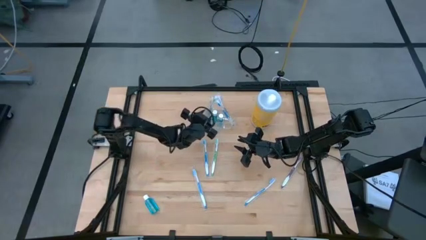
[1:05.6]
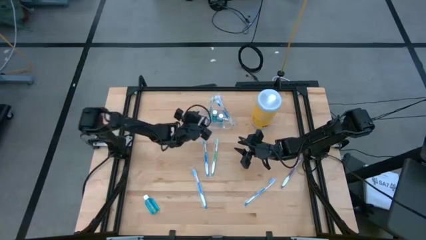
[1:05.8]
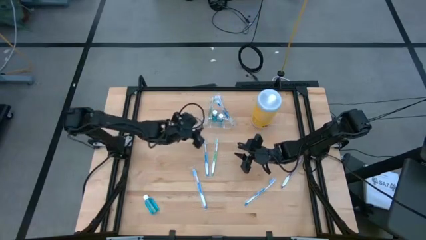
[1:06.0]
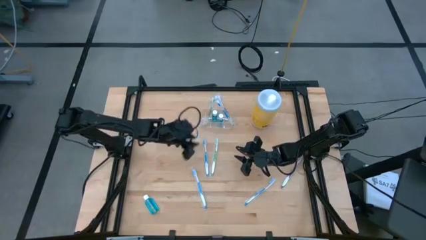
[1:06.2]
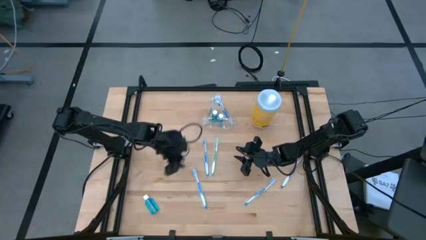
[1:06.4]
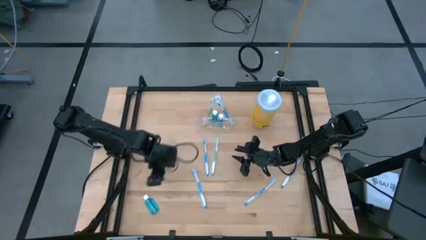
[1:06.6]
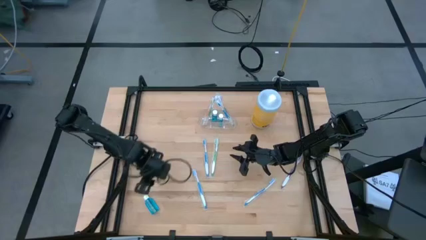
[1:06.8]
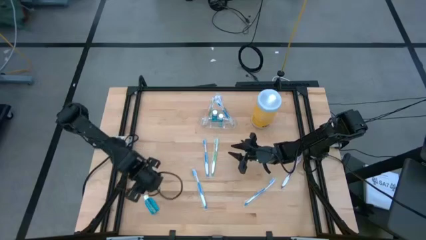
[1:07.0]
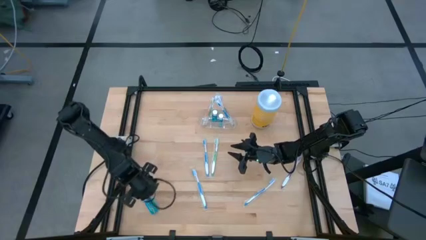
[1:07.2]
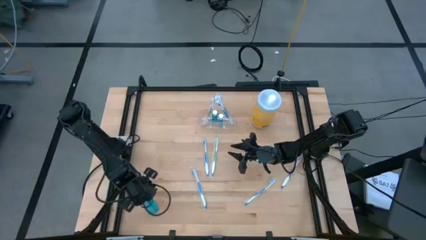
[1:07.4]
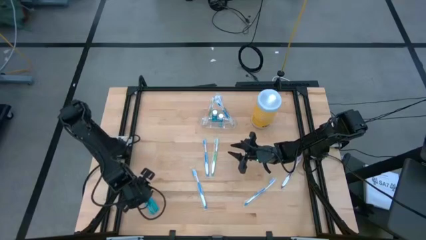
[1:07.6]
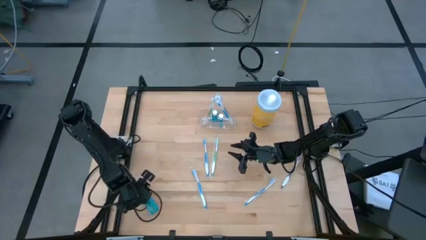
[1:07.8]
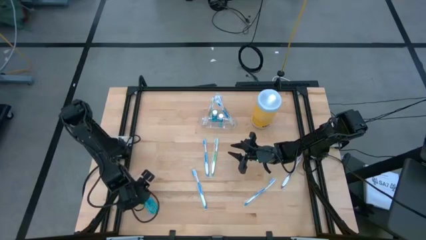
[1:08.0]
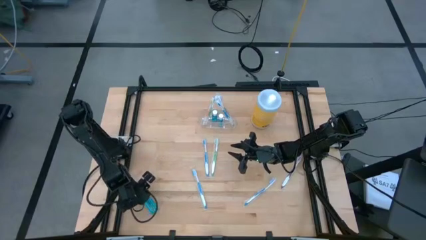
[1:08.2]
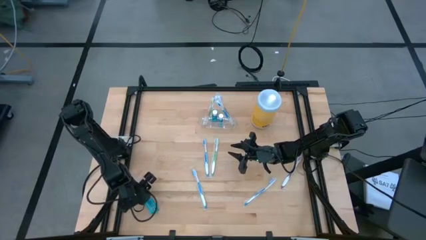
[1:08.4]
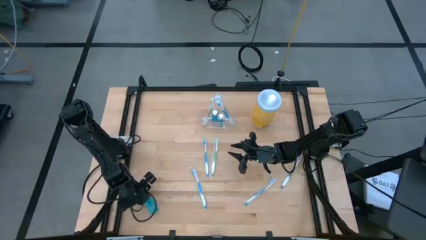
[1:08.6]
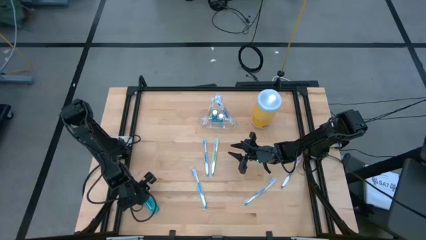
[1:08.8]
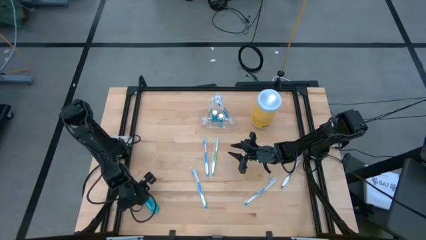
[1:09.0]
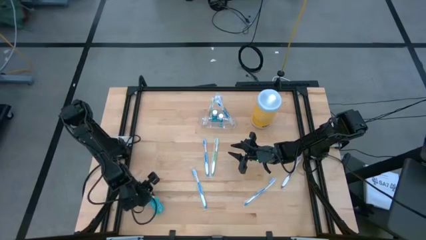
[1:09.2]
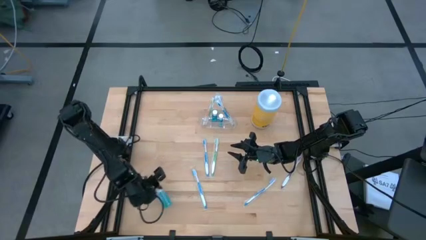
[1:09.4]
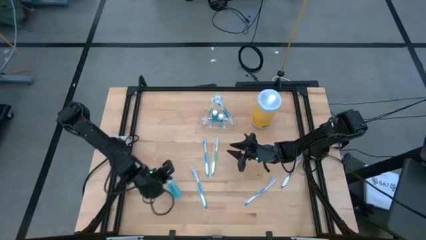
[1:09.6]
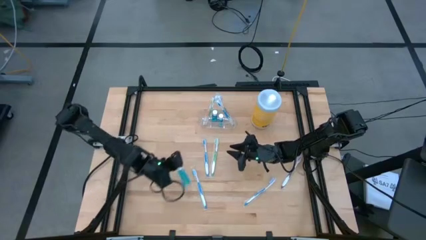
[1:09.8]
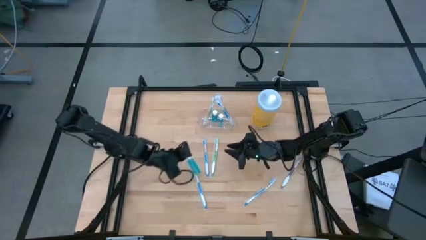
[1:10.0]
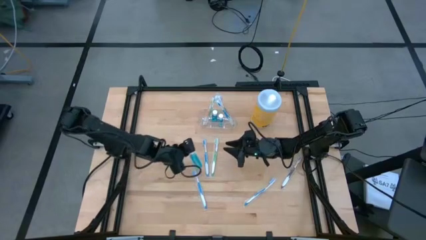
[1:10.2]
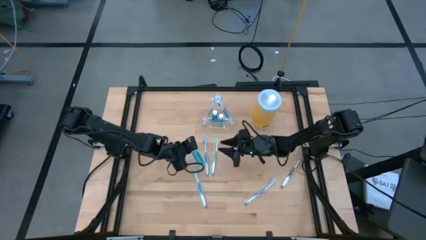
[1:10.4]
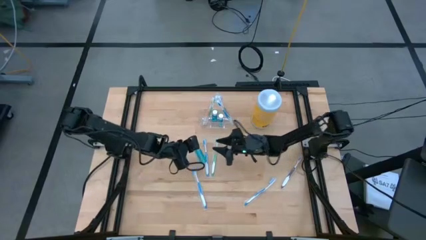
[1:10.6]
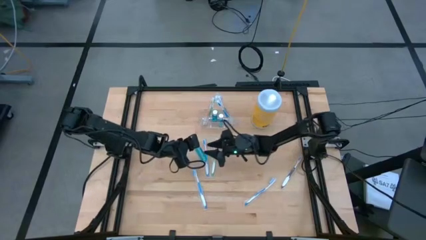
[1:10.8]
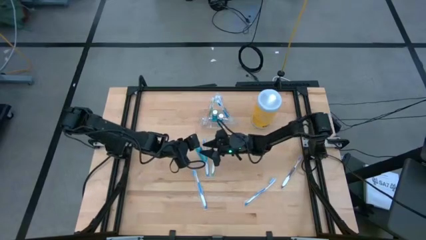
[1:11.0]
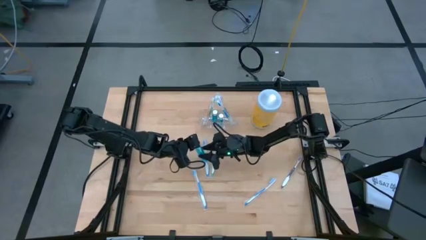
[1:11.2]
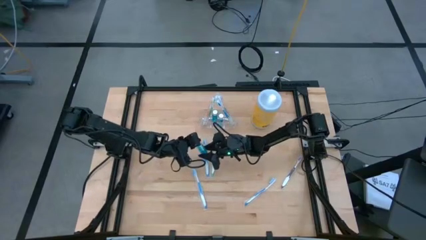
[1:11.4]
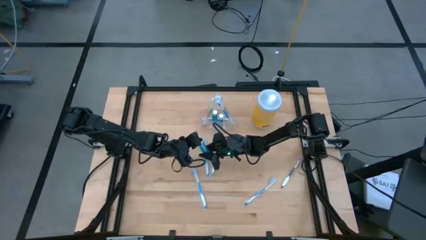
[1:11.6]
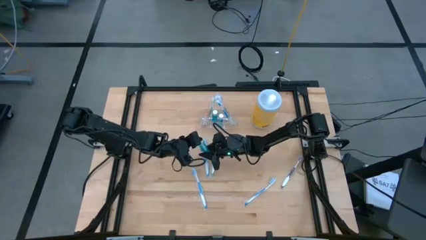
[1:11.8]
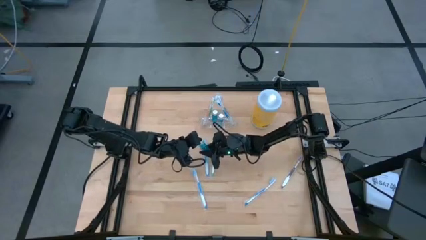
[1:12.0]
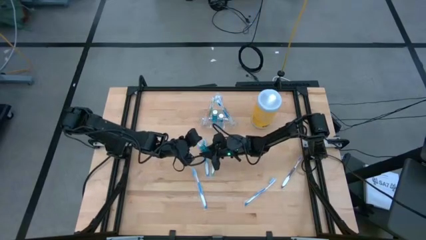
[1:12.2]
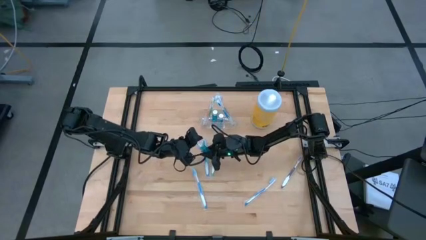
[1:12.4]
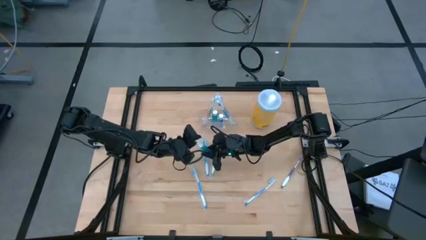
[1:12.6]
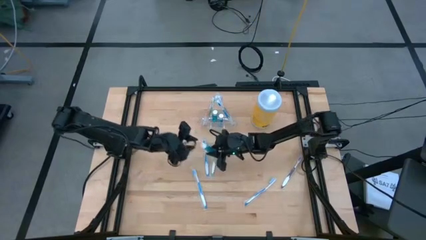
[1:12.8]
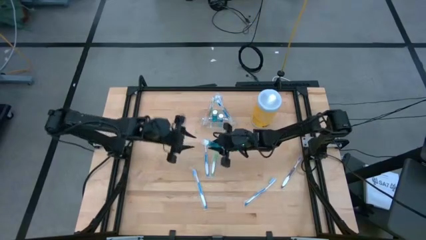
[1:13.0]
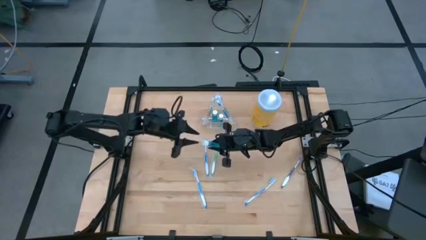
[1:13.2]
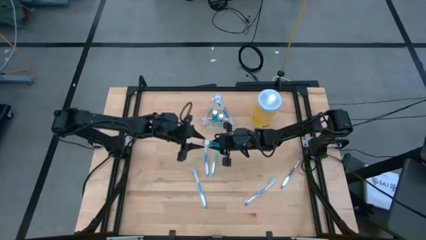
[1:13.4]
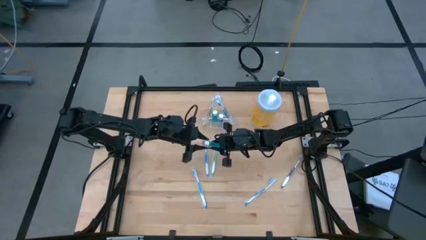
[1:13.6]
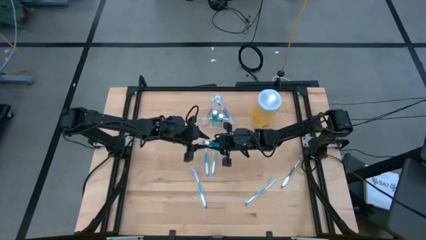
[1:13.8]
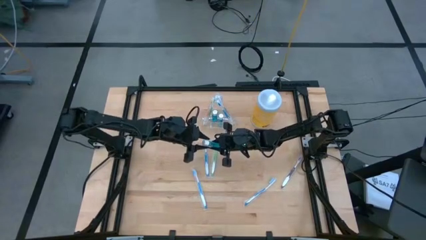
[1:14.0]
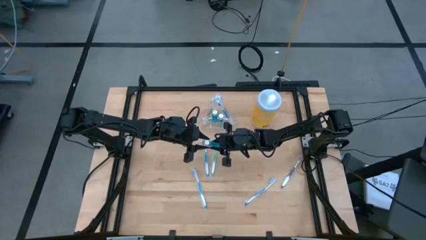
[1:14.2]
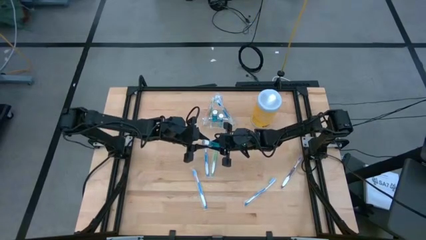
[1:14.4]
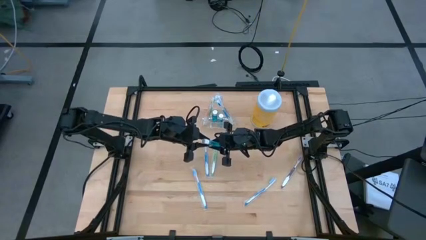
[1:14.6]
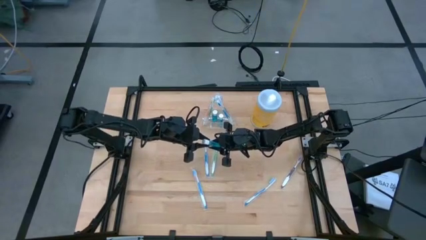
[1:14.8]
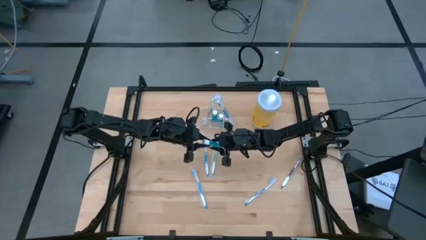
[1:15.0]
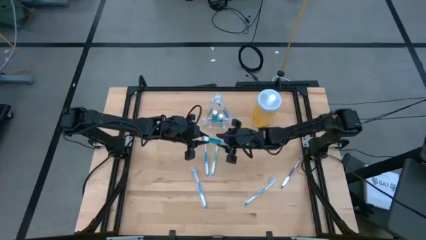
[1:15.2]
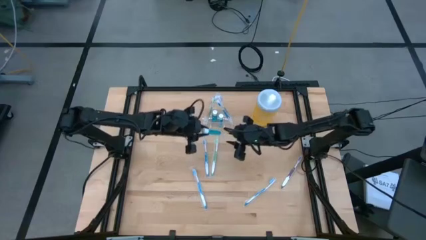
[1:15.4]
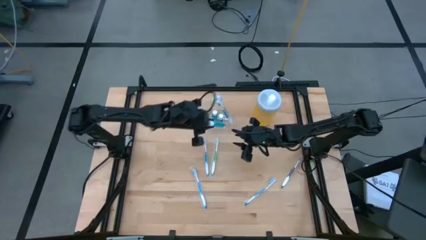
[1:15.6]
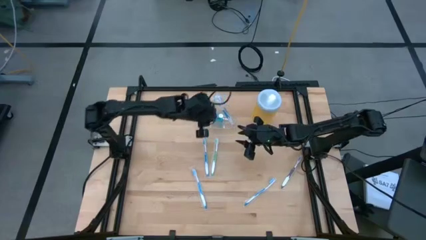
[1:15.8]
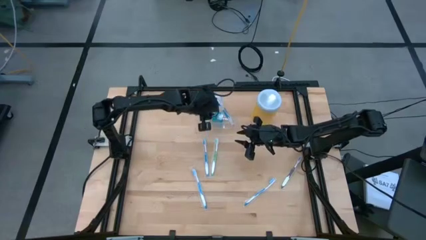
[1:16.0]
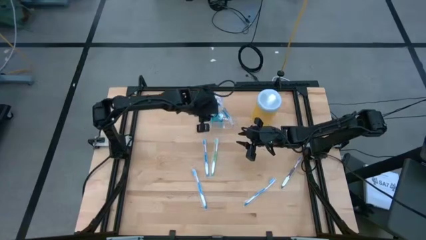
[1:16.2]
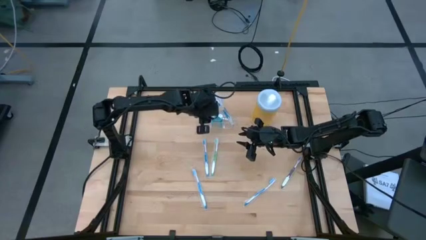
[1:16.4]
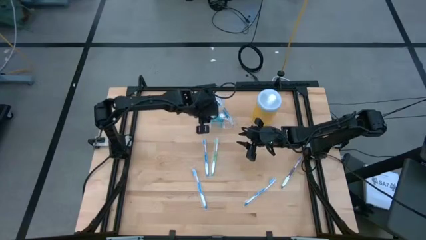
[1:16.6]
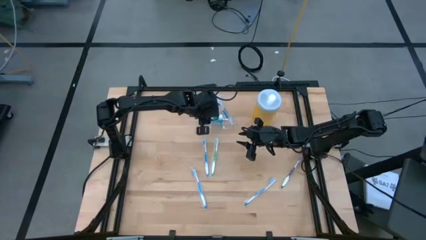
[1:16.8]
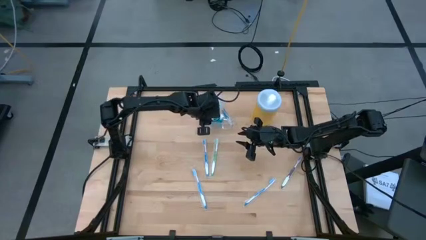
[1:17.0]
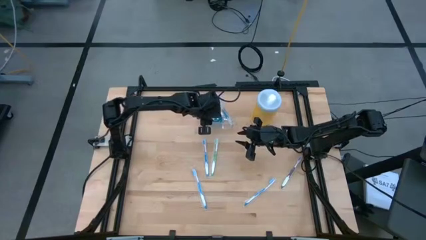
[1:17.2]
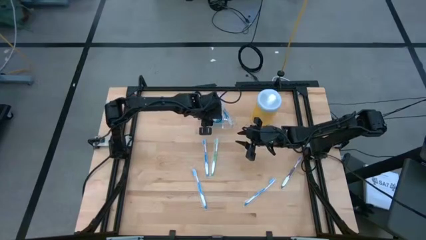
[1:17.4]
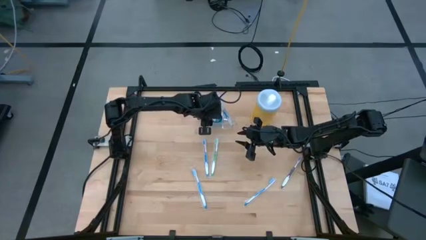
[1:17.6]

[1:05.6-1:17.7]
Task: Pick & Place toothbrushing station
Put the blue mouthwash into the middle compartment of the transparent organizer

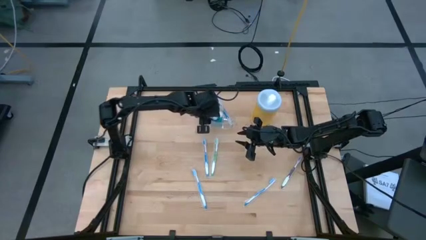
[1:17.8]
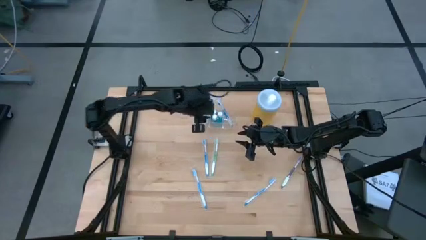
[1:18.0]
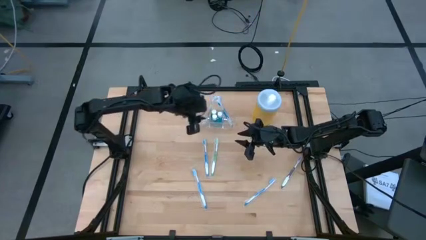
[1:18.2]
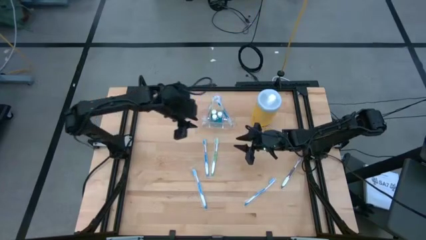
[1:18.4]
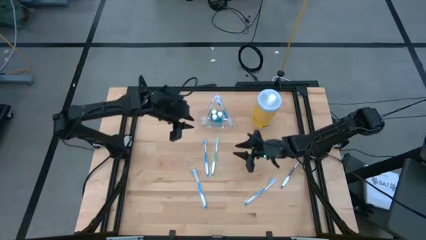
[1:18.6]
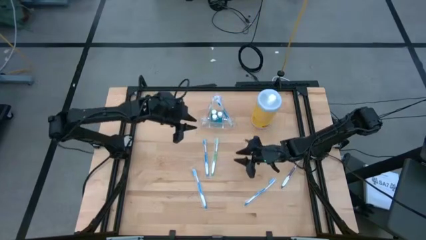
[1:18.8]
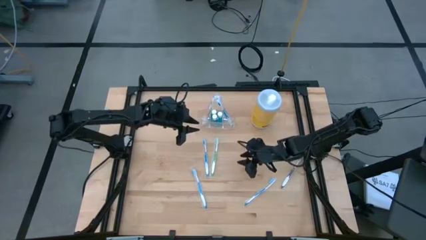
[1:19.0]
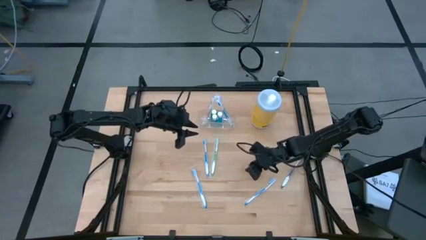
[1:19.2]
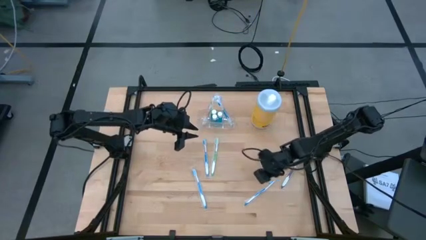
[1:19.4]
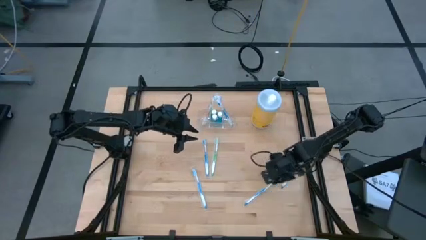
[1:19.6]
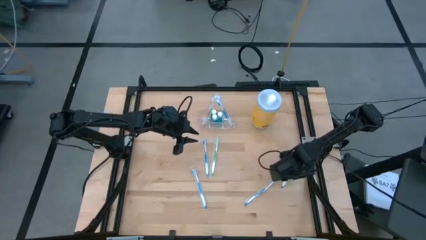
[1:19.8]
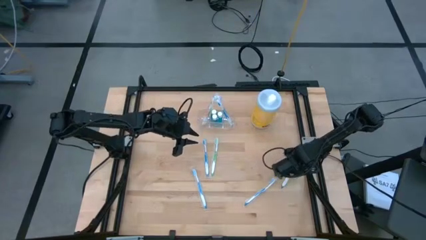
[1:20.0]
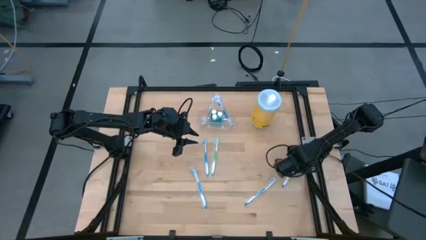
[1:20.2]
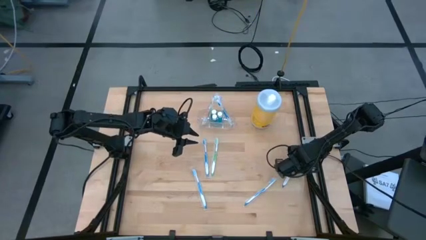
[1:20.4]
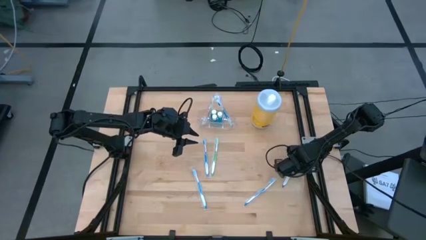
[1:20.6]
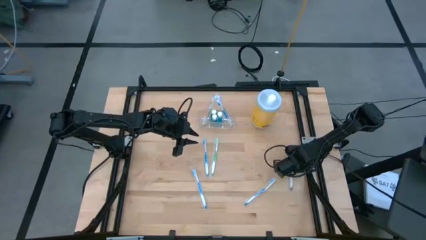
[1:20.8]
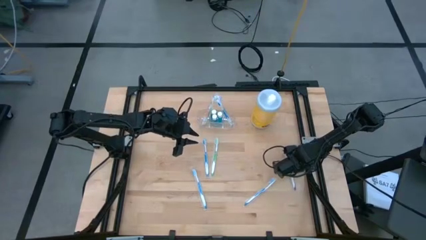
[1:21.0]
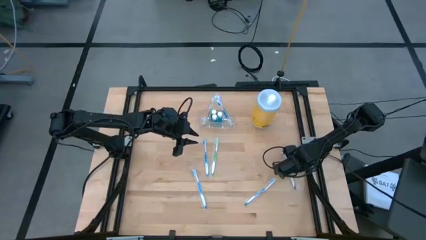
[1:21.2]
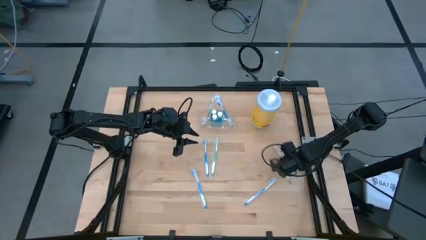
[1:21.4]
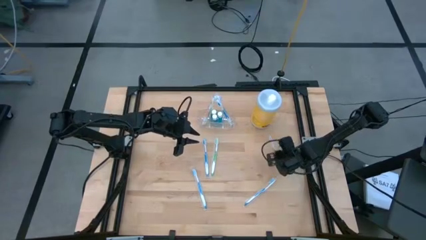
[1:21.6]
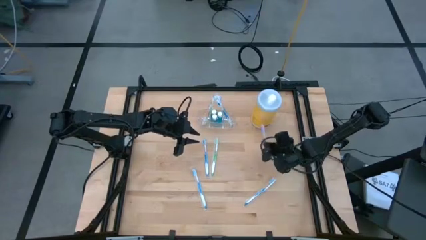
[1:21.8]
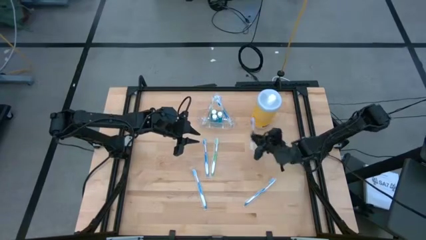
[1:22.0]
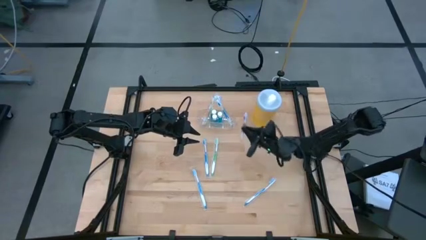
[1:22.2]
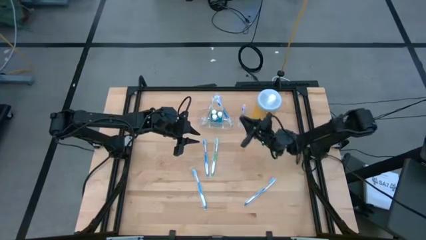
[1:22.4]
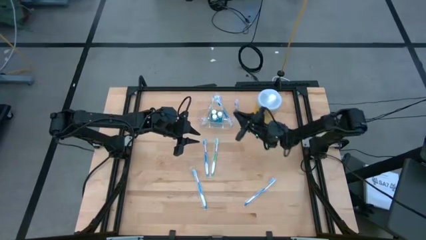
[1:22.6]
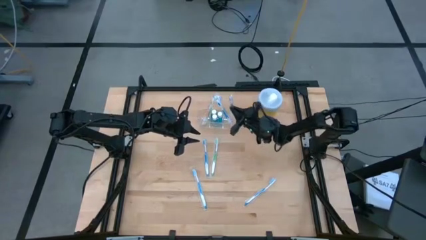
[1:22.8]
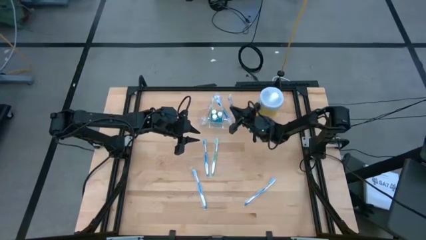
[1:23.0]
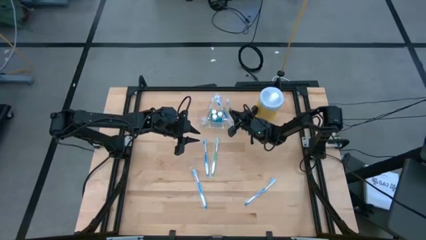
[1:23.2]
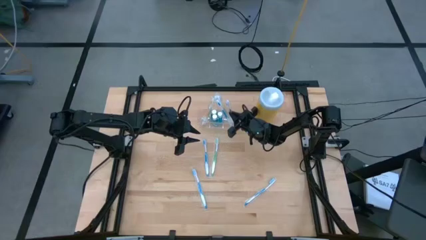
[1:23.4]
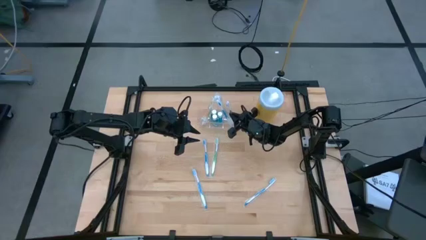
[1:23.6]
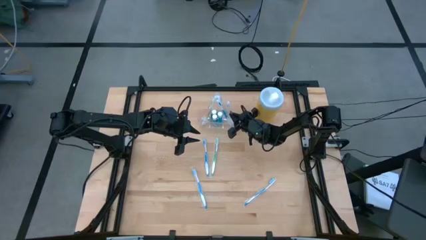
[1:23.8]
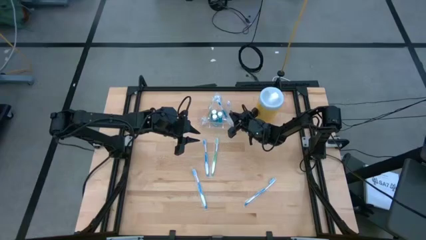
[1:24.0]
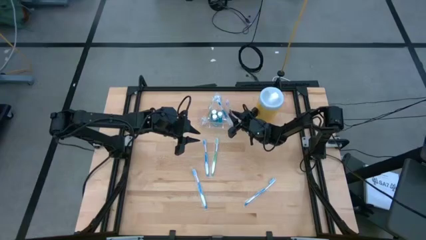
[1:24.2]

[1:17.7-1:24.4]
Put the violet toothbrush into the right compartment of the transparent organizer
